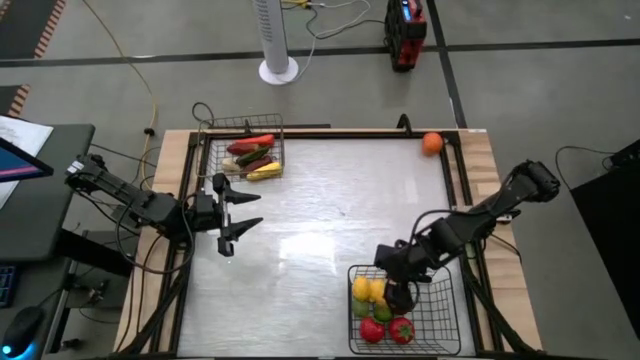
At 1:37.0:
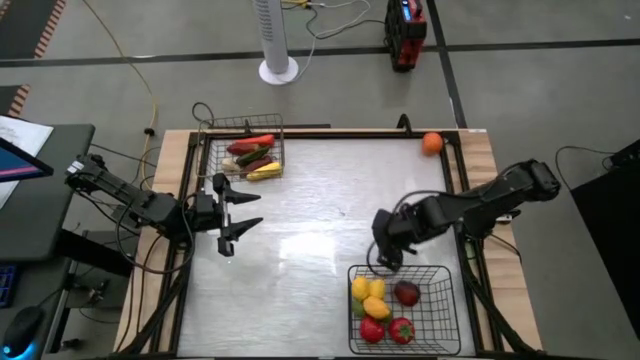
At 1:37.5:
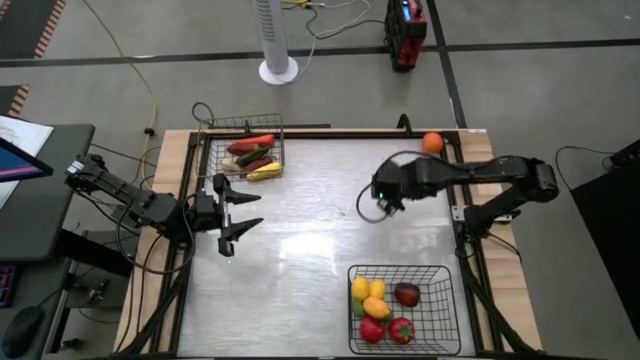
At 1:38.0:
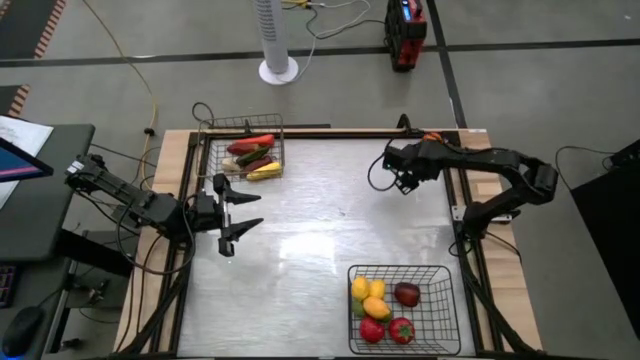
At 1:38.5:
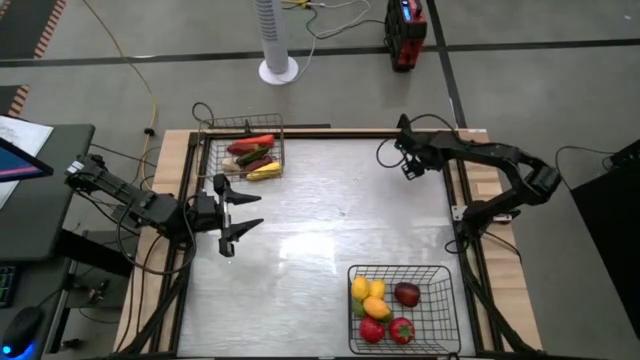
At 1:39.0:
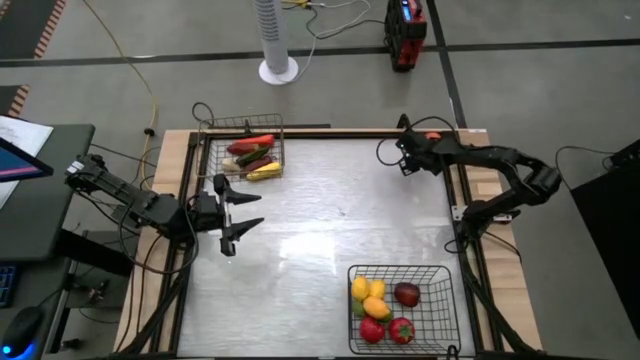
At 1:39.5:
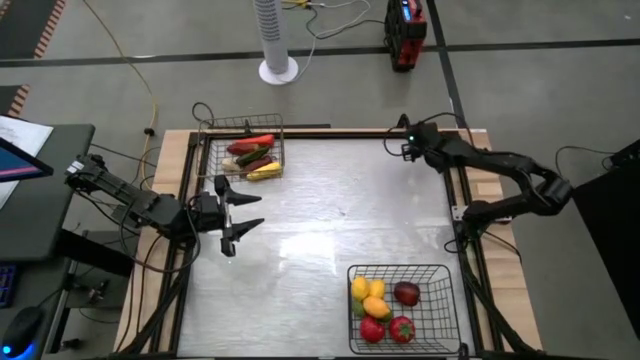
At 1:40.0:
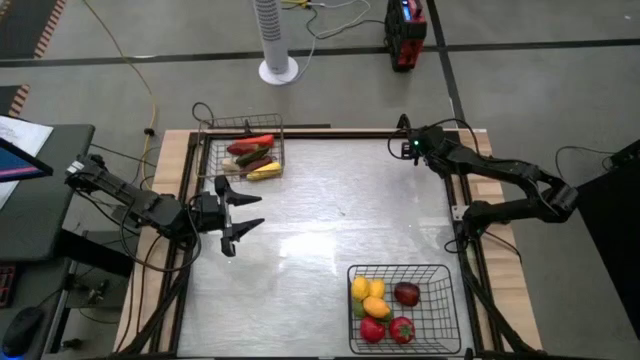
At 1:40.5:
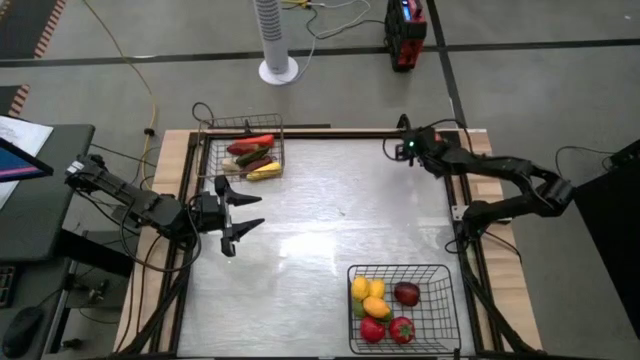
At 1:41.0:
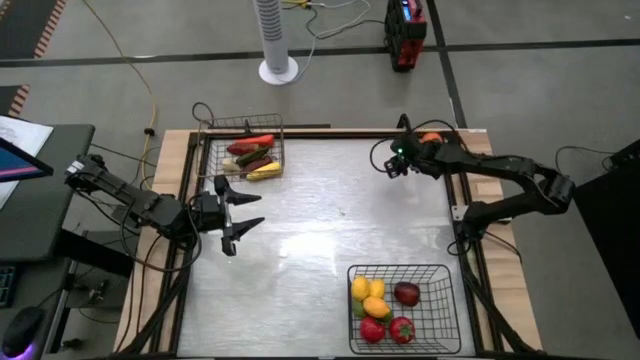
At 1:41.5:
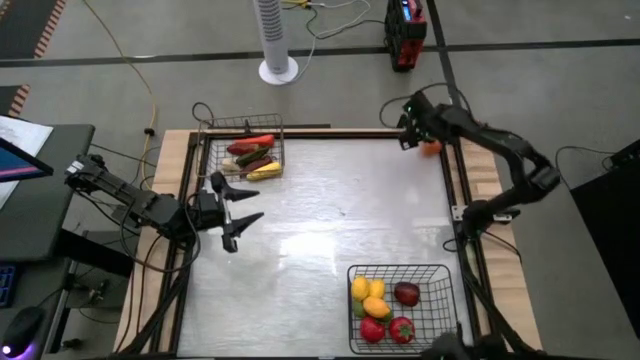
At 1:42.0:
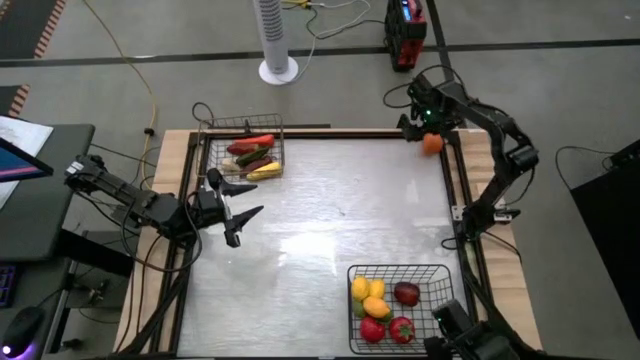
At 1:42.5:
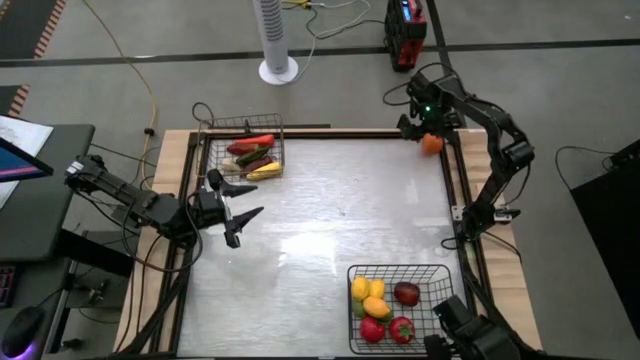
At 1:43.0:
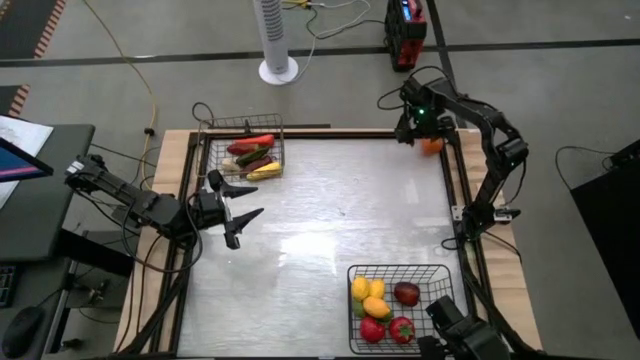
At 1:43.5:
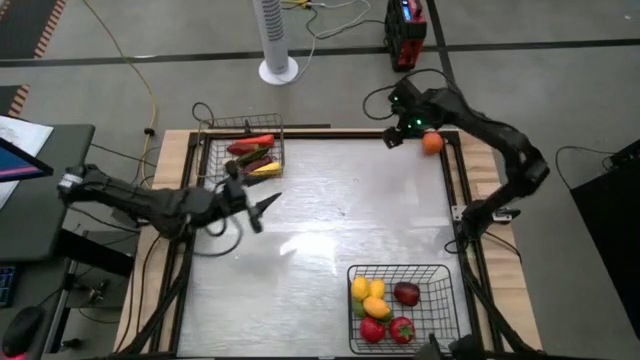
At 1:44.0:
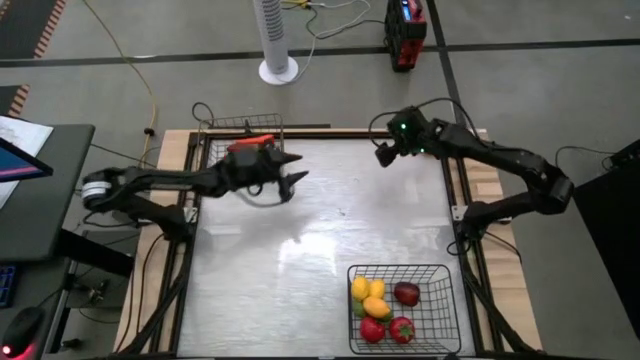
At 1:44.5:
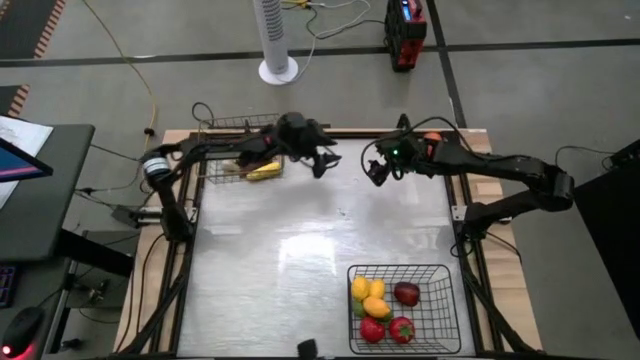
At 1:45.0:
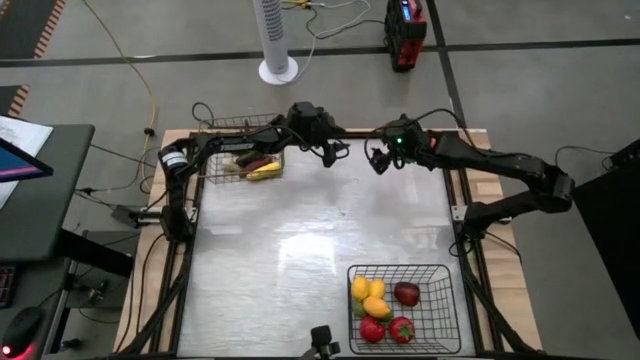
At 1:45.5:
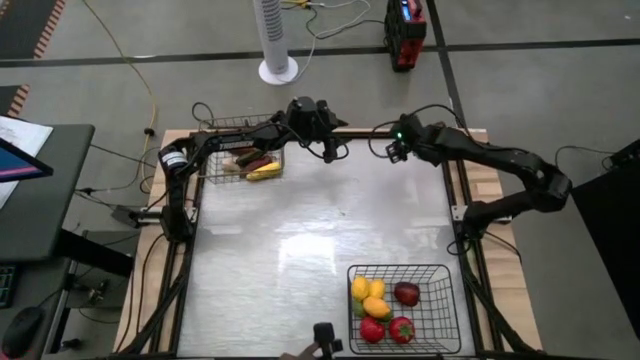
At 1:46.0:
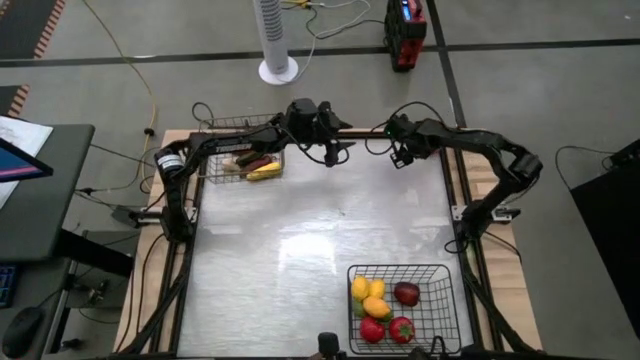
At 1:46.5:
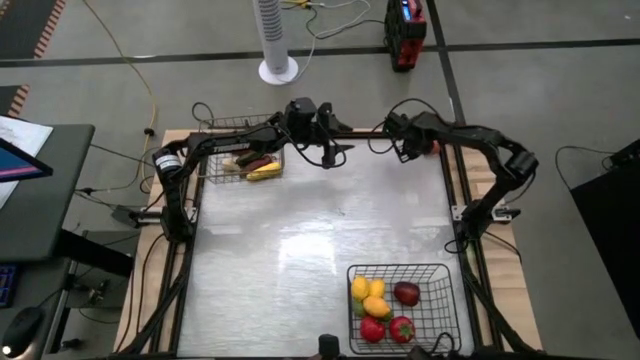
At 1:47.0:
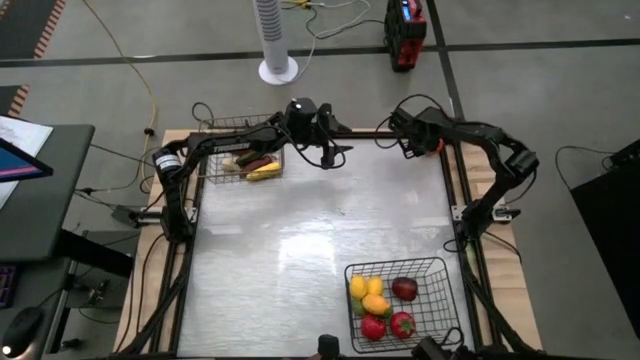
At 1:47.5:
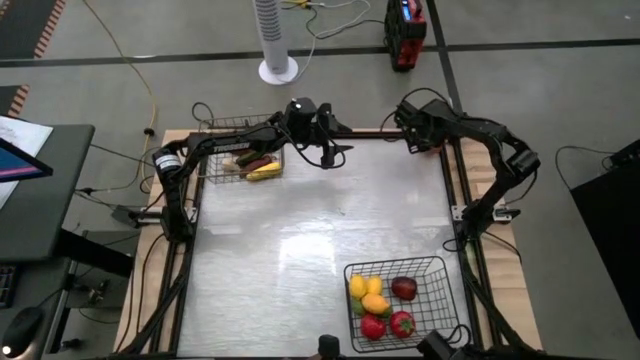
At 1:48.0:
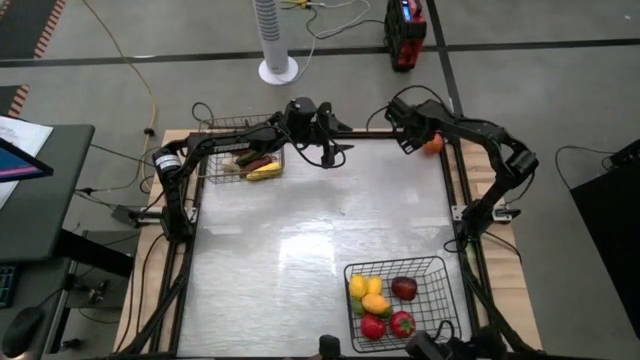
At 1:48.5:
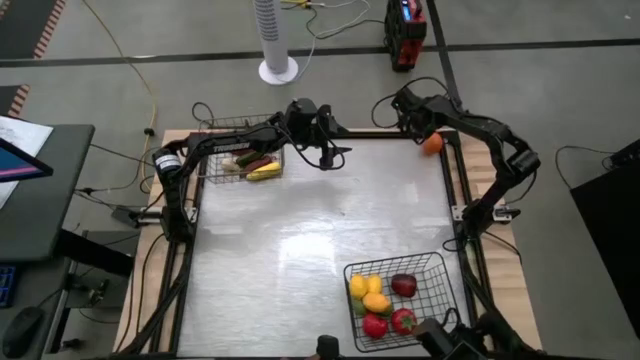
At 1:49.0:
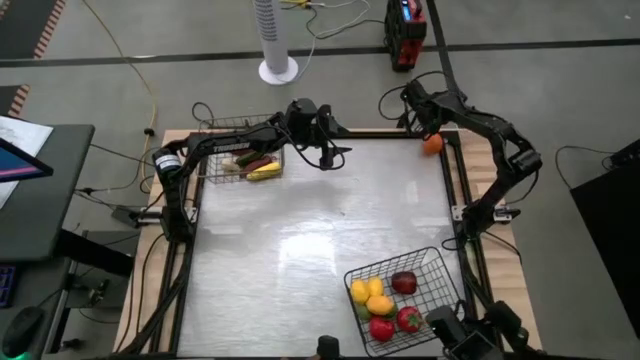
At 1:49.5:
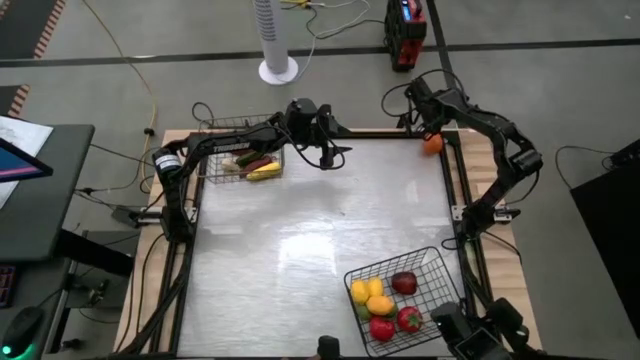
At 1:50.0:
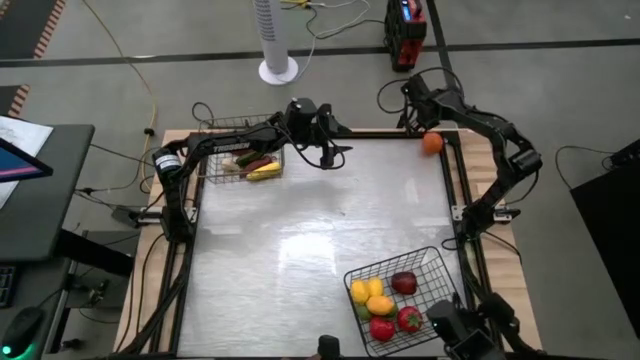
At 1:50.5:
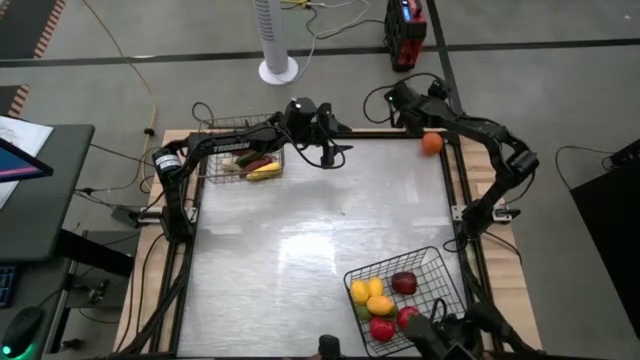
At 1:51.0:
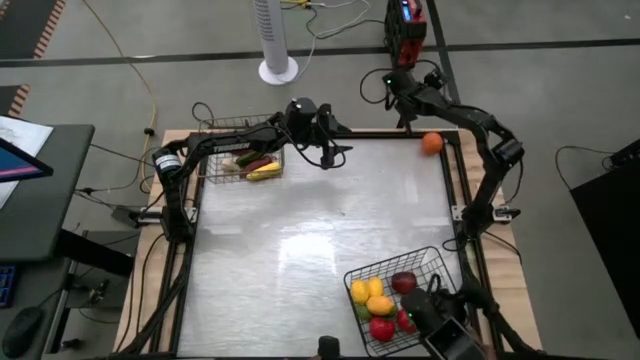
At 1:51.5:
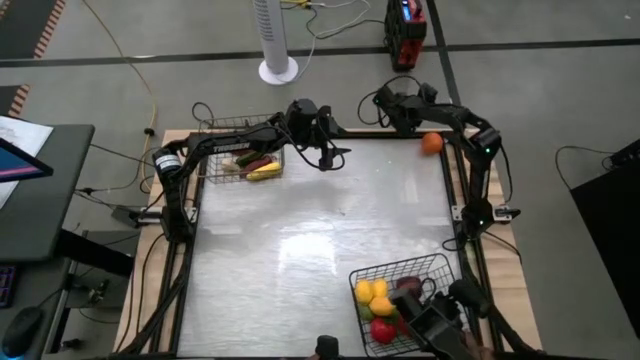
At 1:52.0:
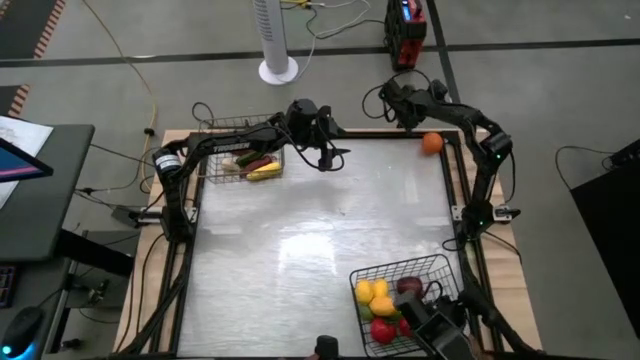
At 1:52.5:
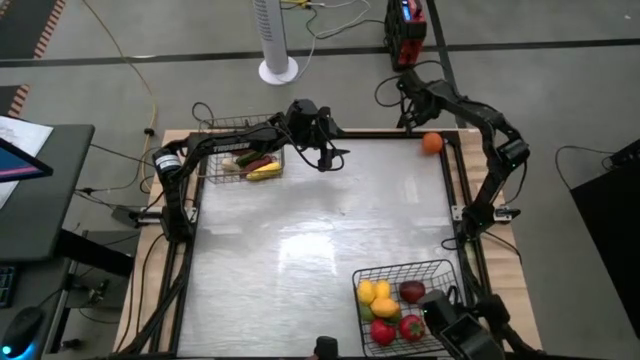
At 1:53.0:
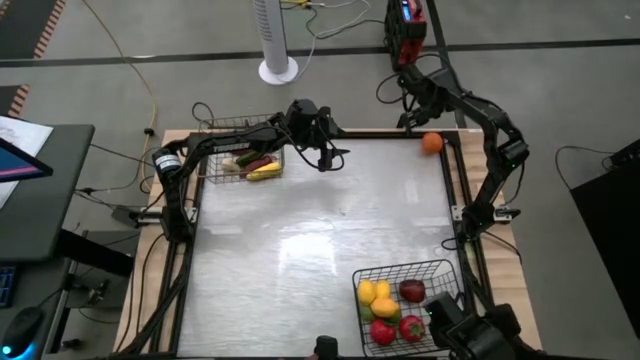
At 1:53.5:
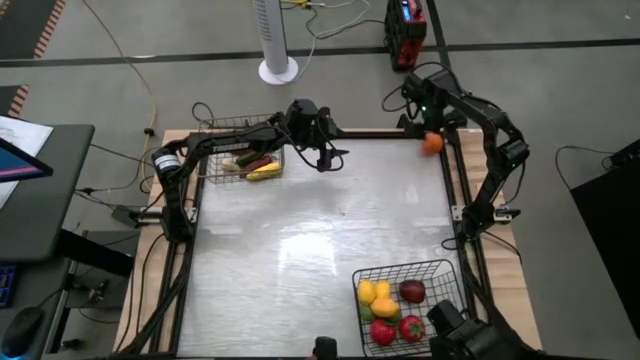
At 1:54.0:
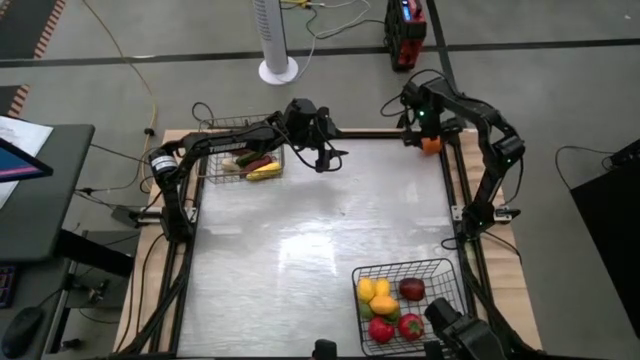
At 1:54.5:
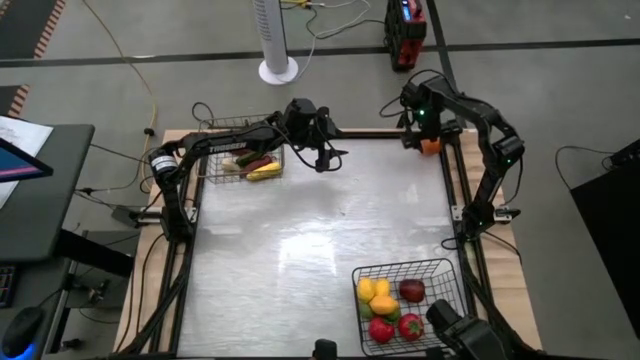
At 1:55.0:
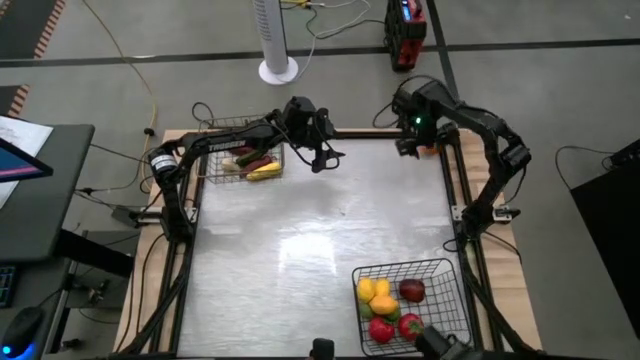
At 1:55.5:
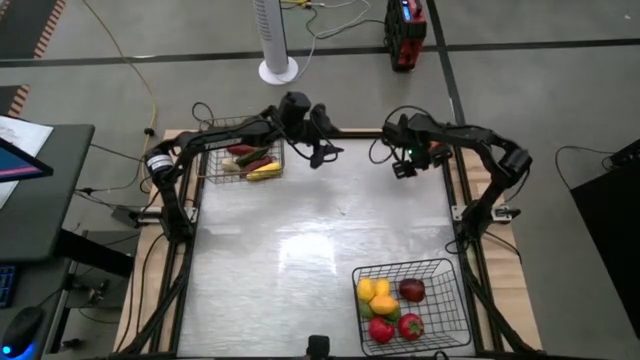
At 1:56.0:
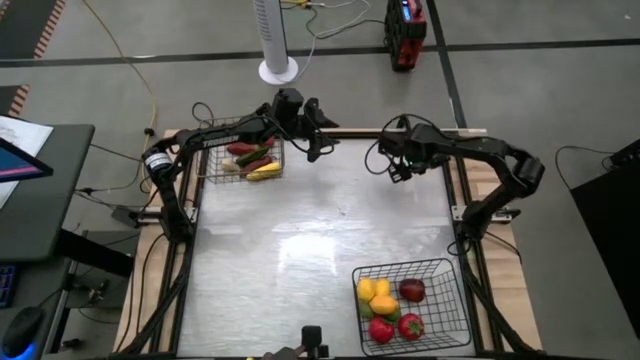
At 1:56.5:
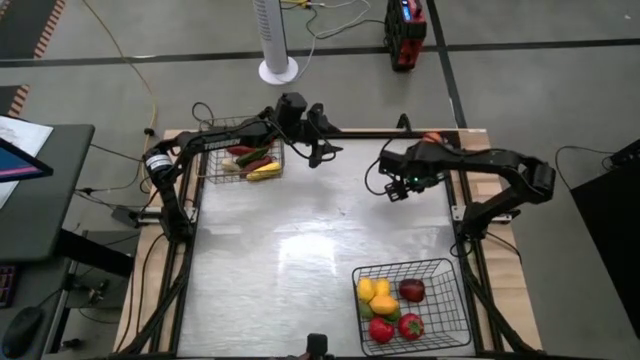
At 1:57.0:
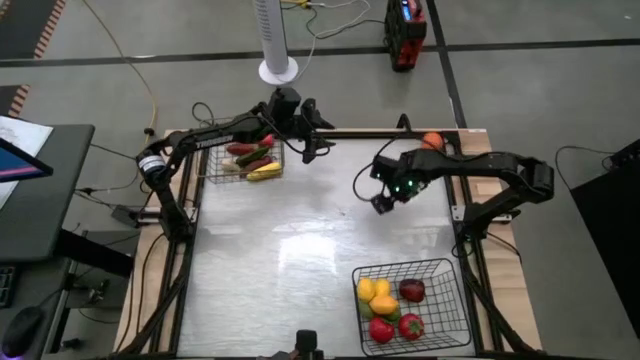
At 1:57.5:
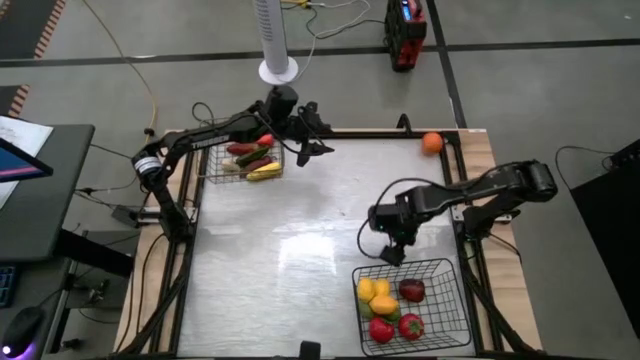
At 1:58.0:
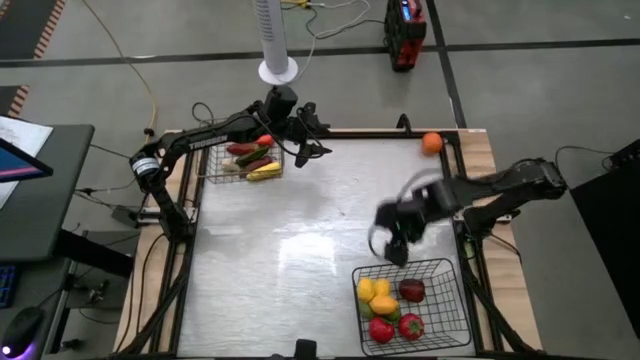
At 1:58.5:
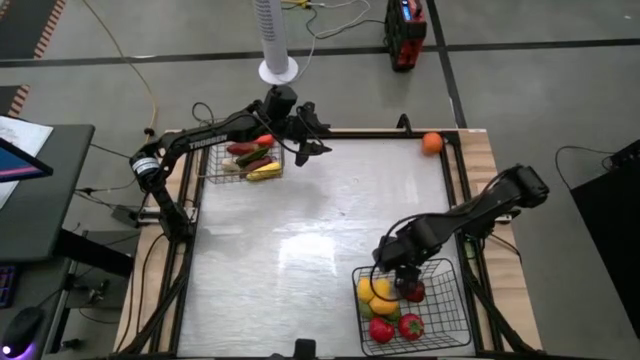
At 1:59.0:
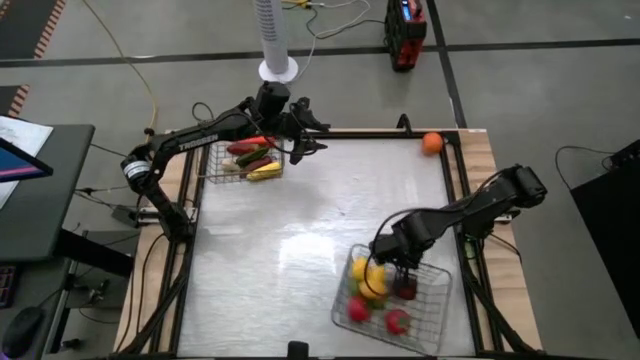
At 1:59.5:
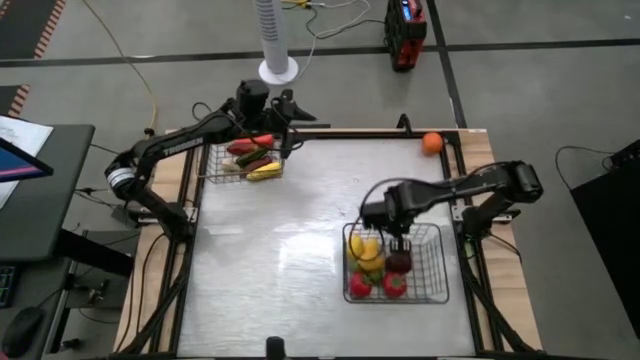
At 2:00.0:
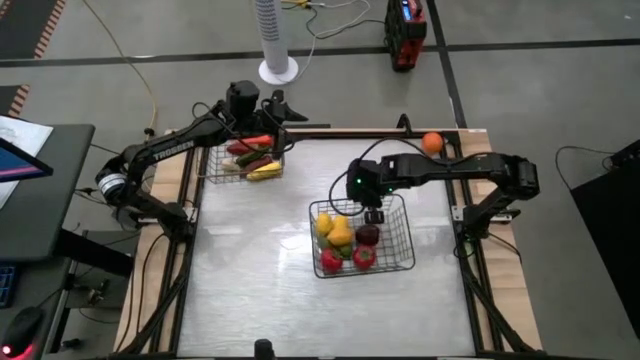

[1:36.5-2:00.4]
Task: Sort produce into baskets
Move the bottom wire basket to the center of the table
